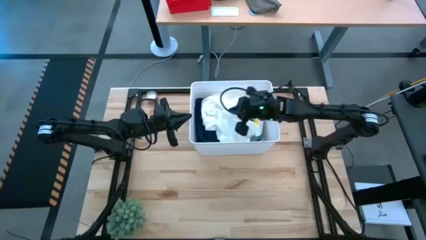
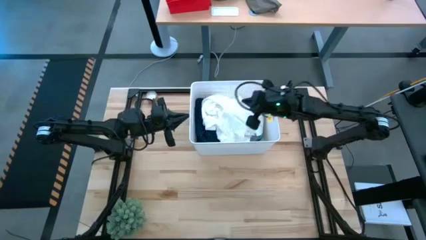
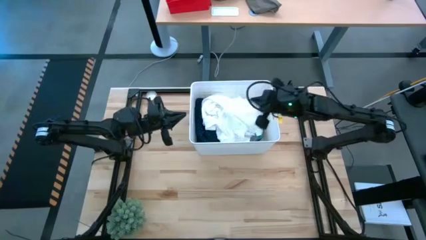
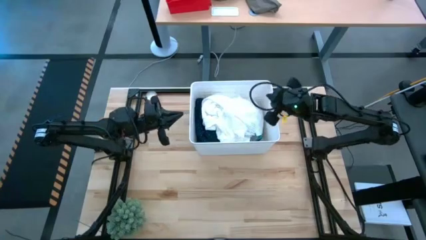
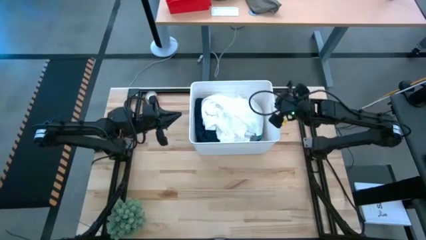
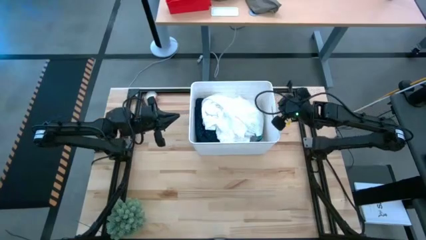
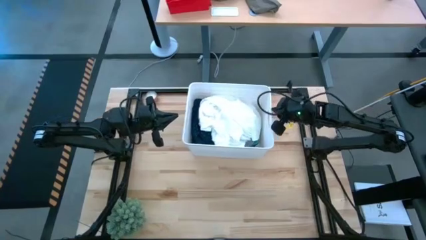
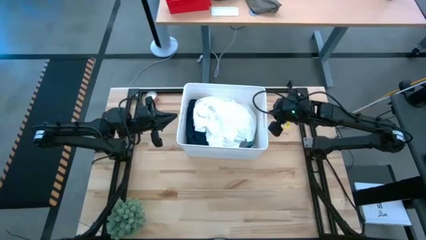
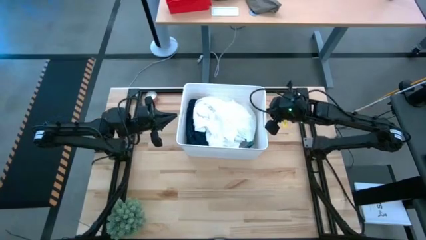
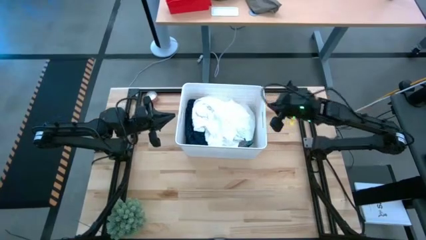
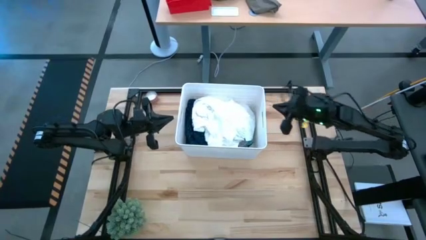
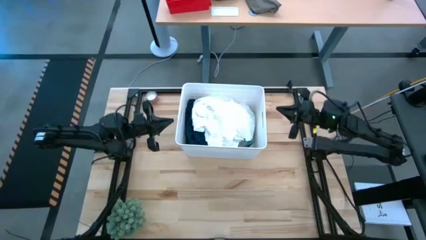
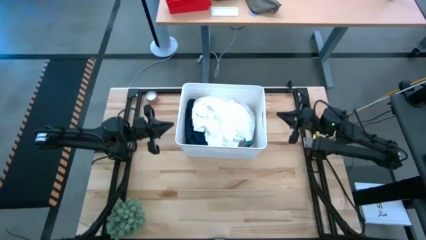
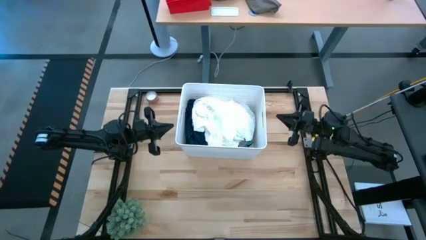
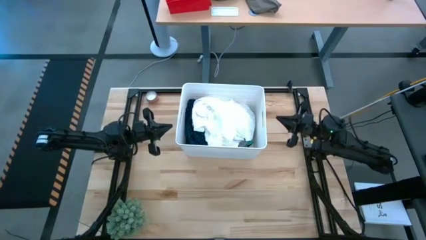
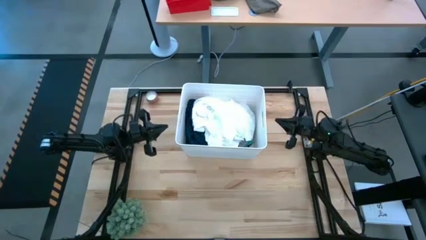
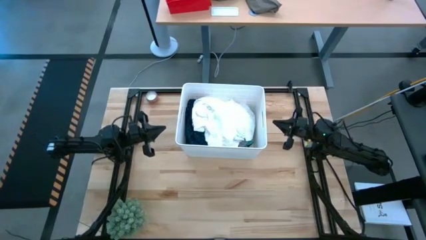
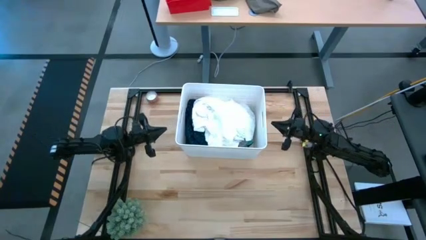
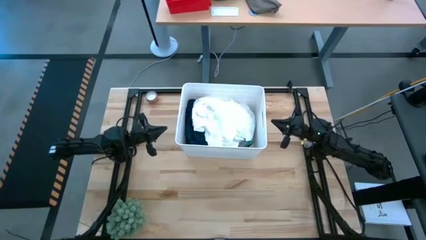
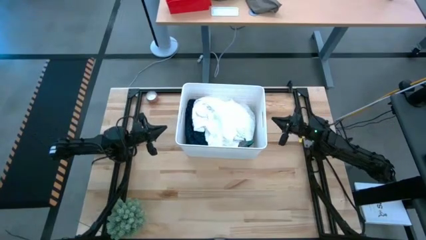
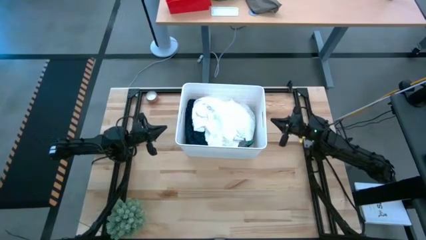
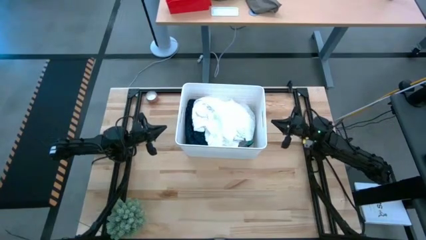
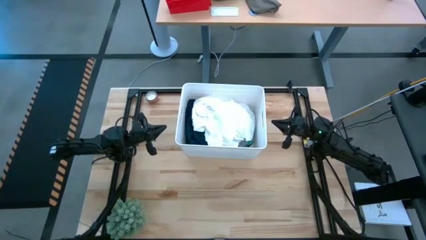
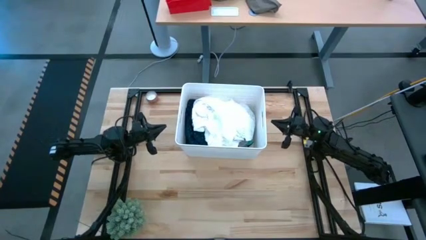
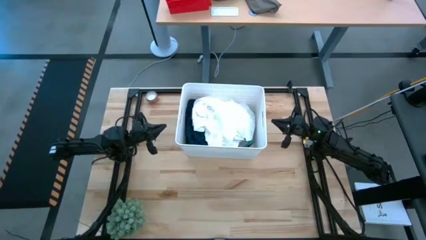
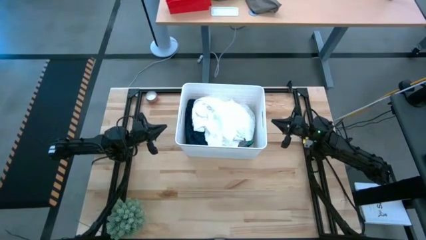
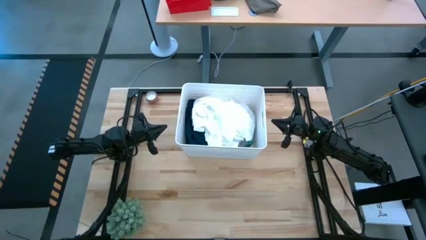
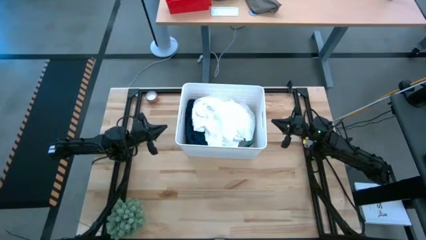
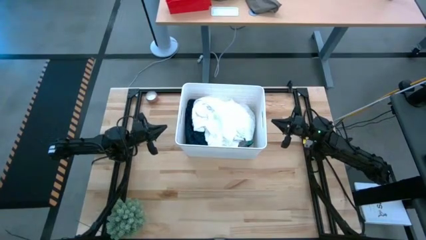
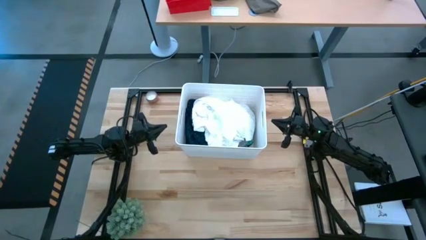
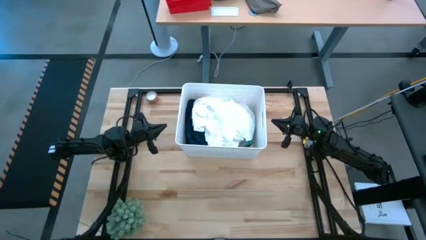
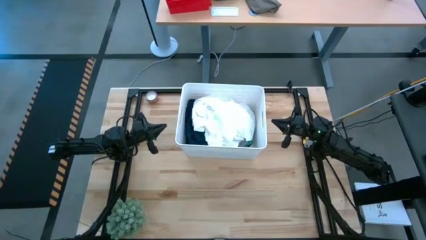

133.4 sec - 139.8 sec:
Task: Sort clothes
Return to Home Position

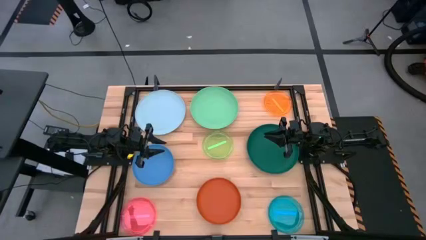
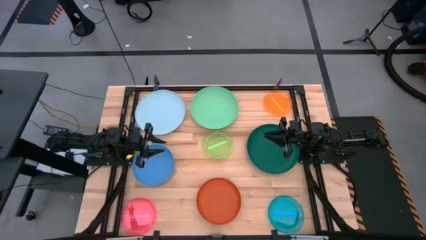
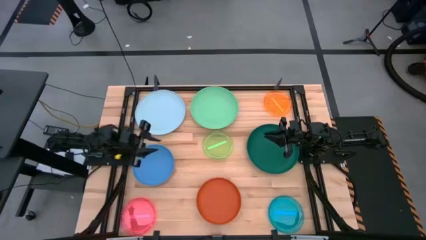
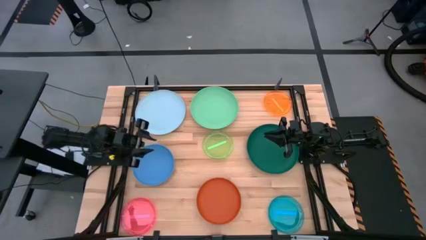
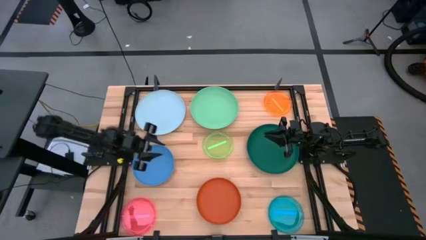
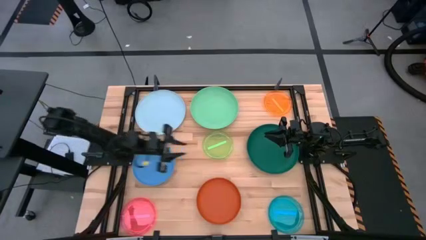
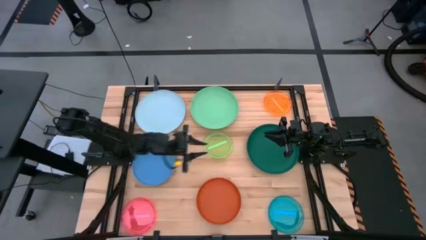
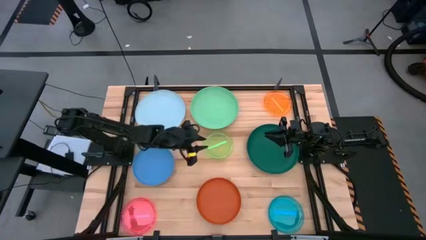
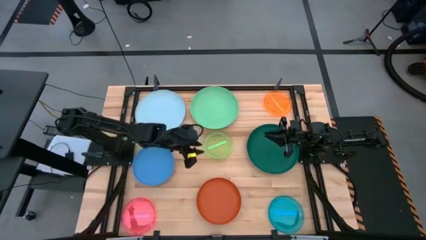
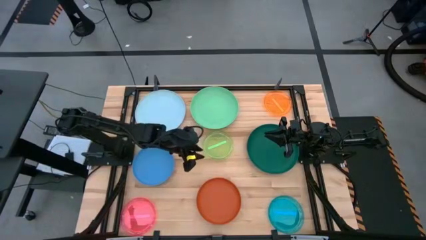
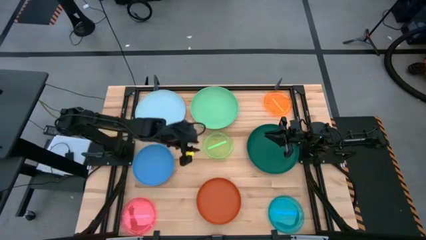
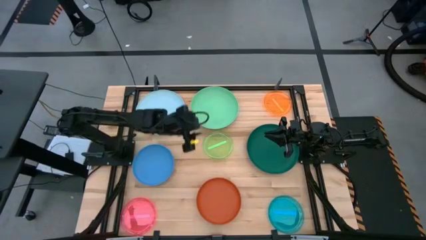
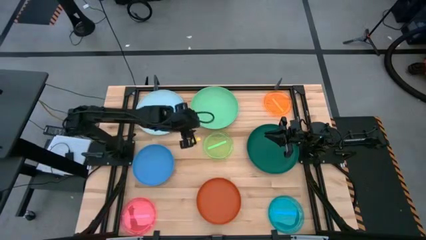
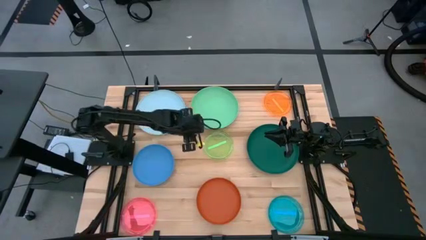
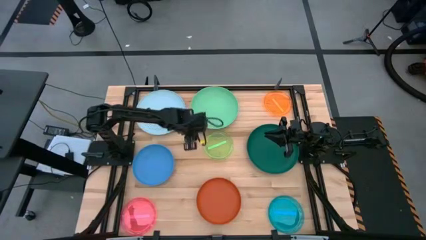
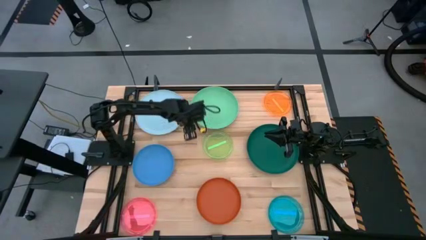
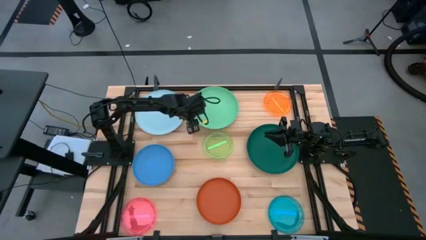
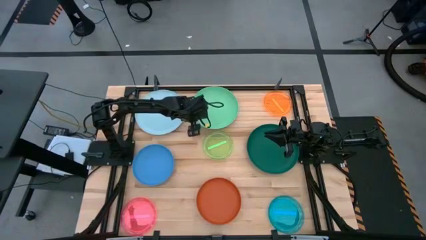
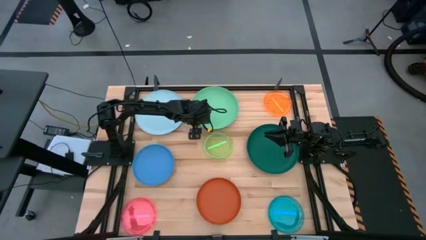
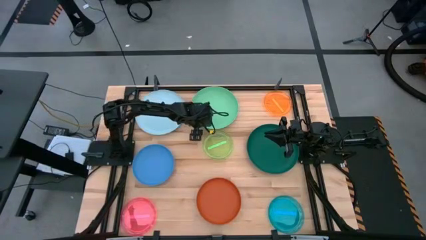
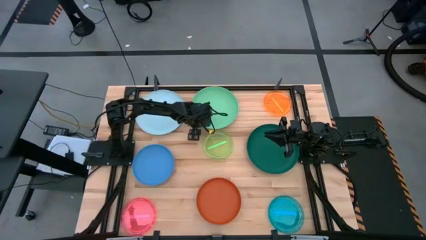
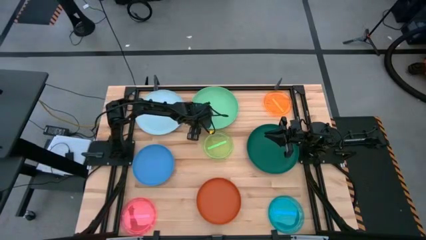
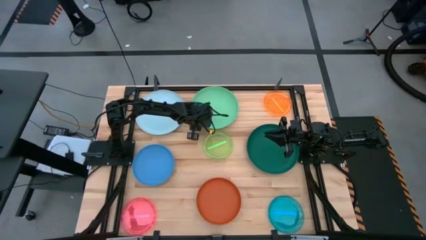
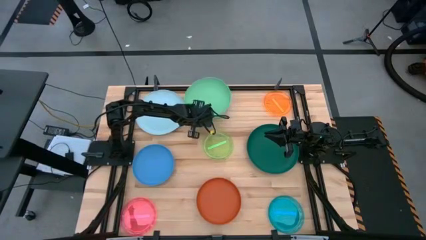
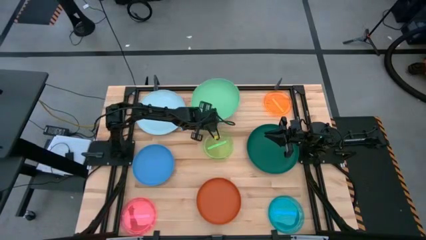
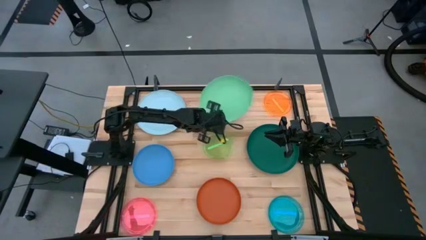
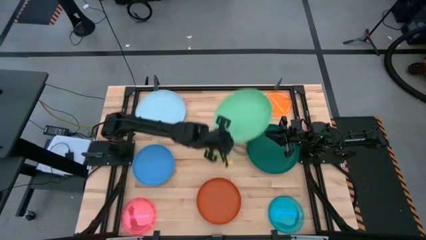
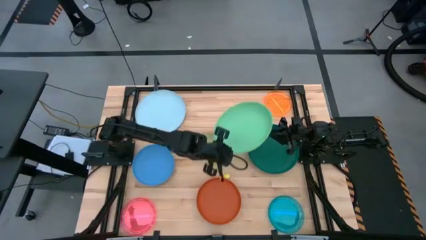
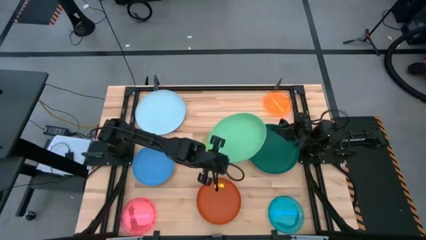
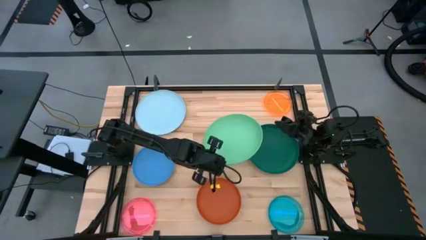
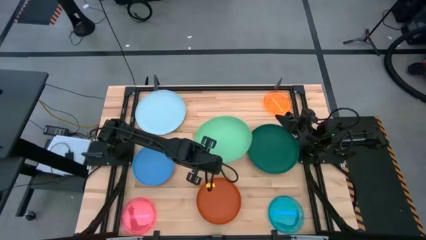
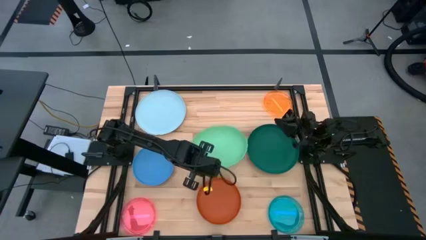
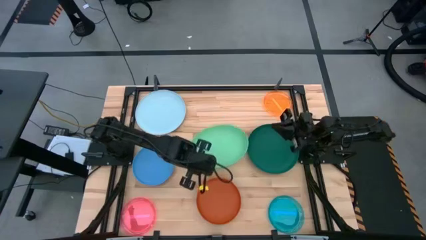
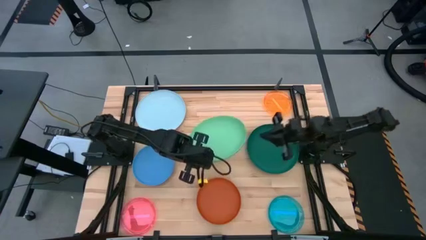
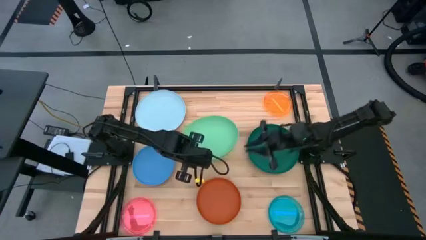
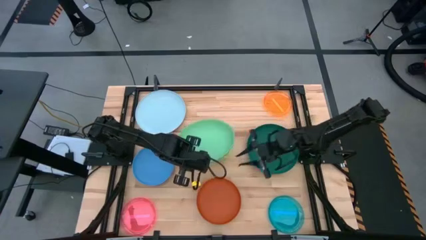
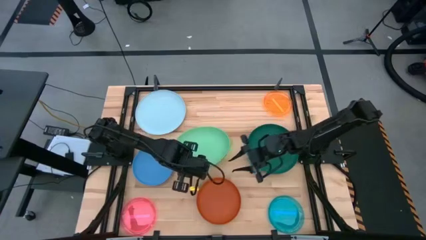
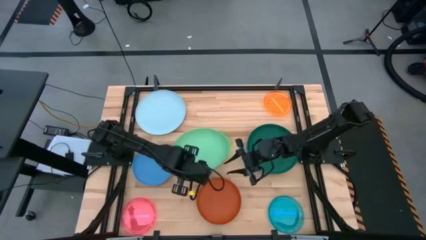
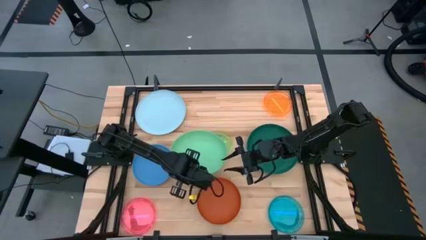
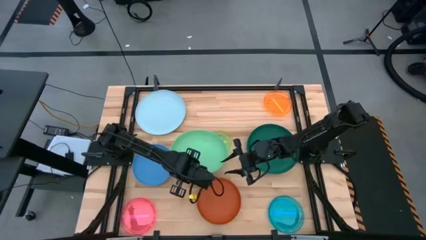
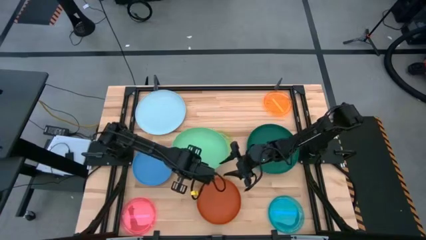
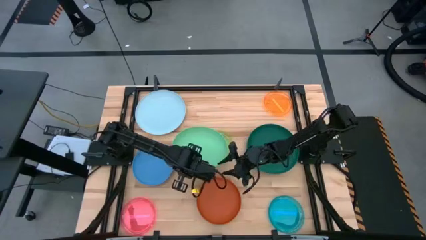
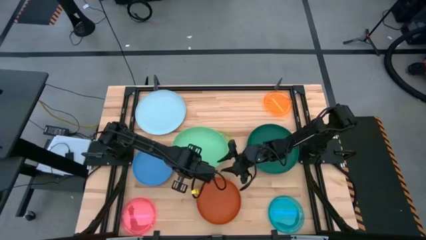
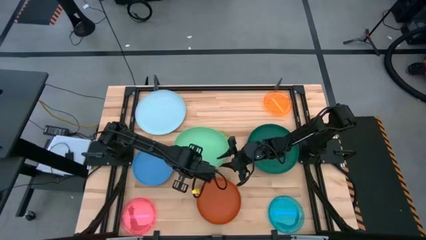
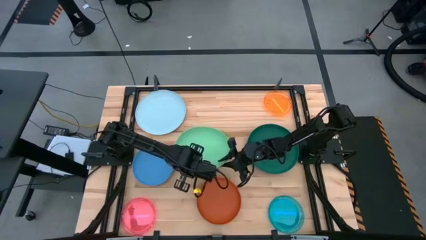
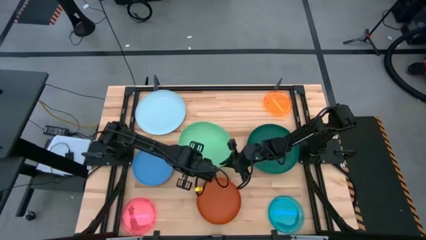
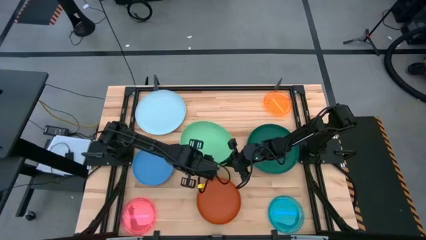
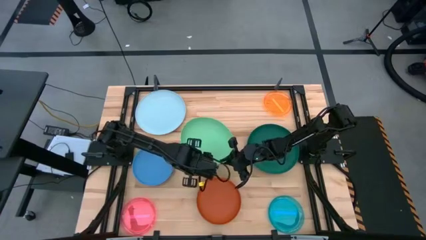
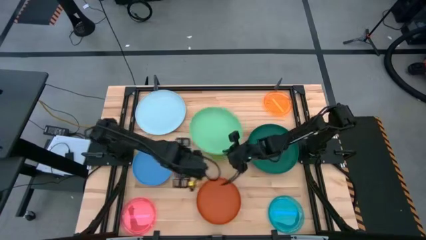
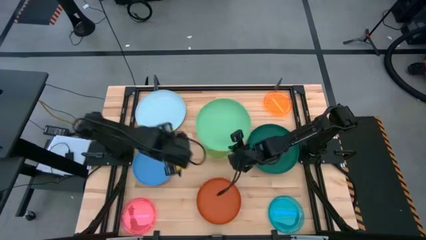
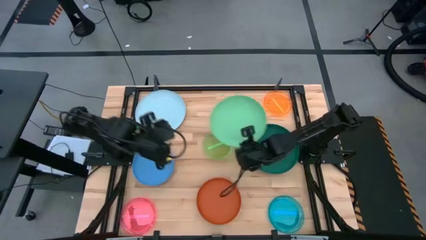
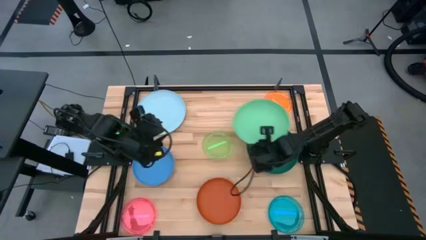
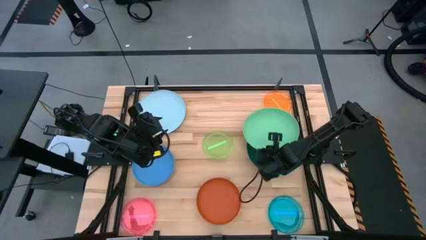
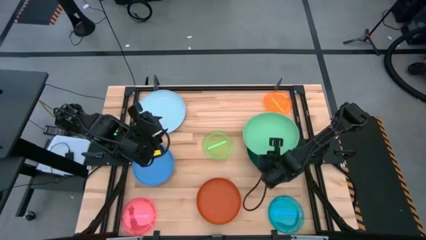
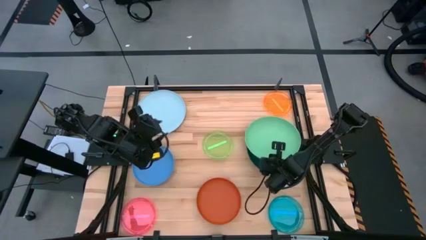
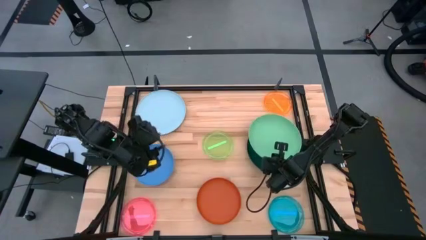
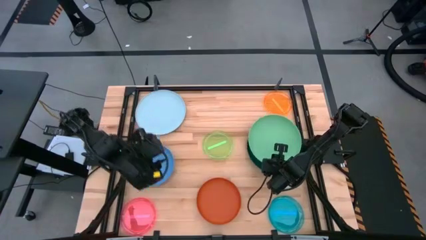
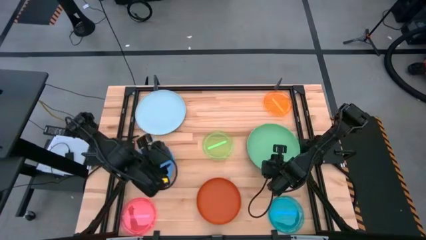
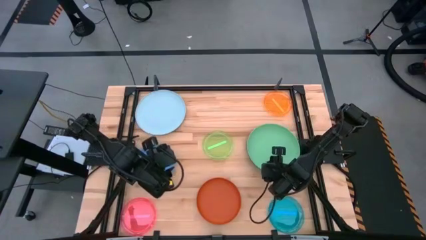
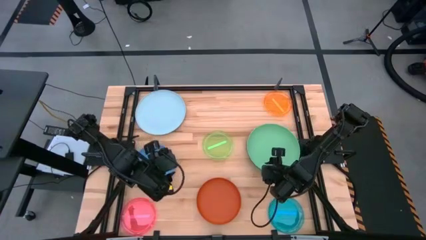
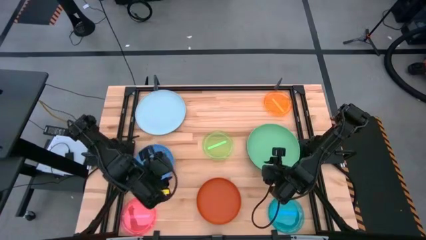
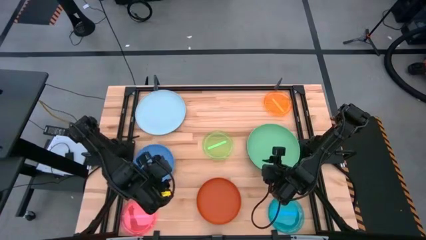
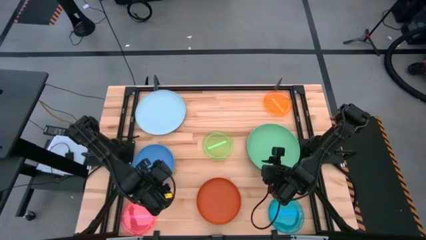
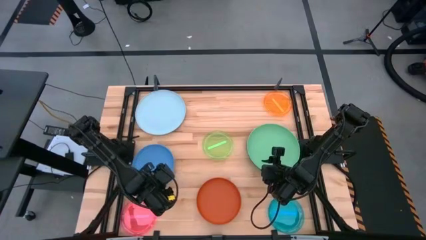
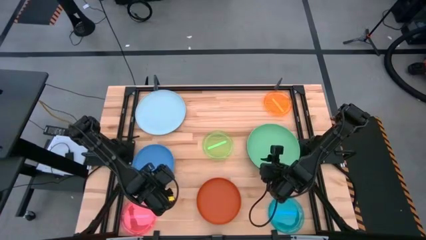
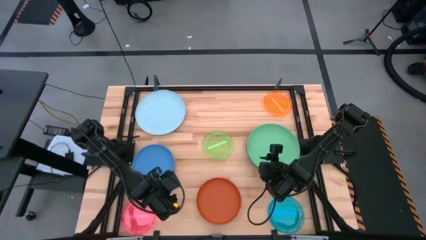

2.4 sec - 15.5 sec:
Task: Stack plastic plates
Stack the large light green plate on the large dark green plate
